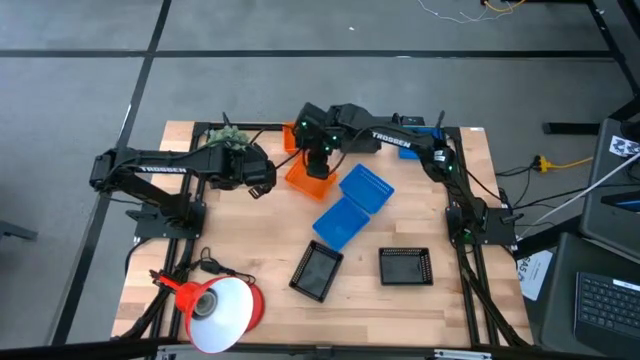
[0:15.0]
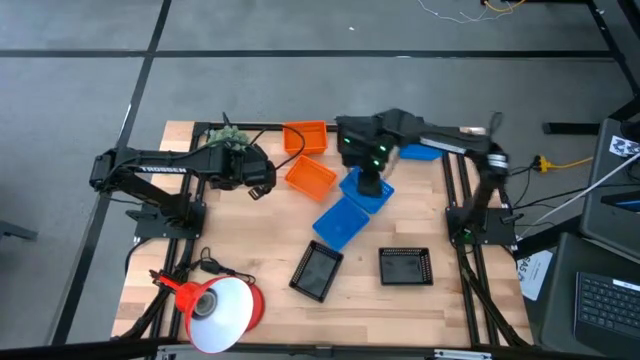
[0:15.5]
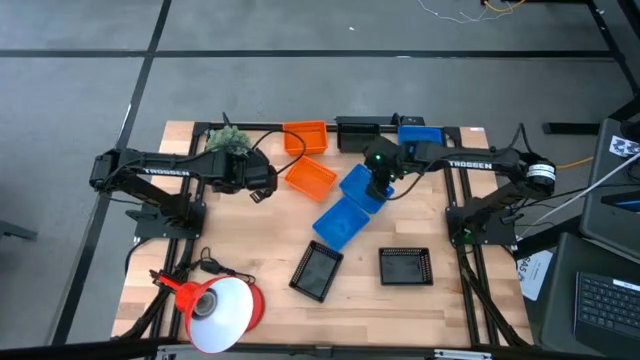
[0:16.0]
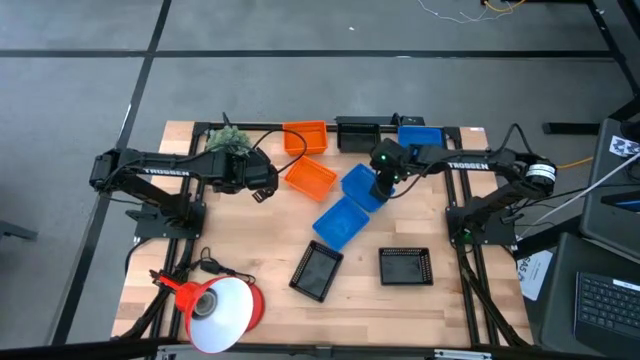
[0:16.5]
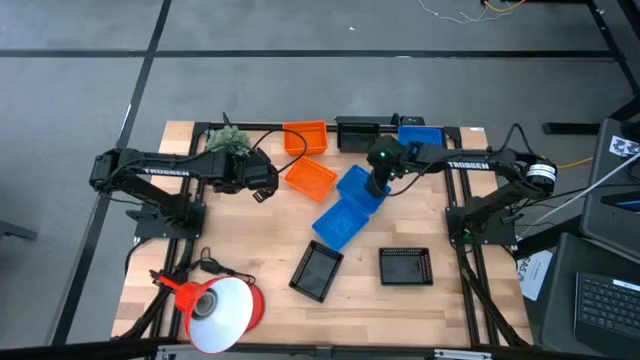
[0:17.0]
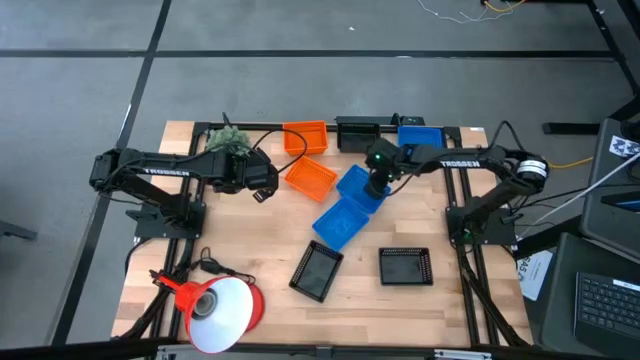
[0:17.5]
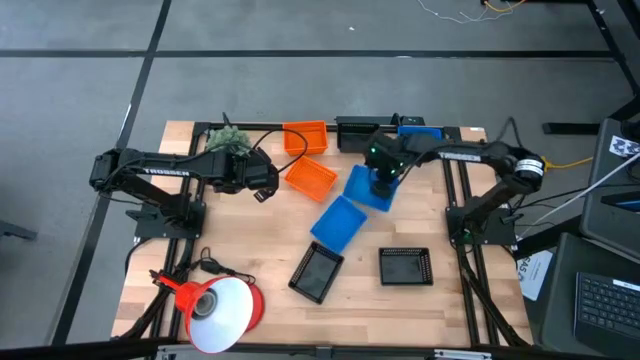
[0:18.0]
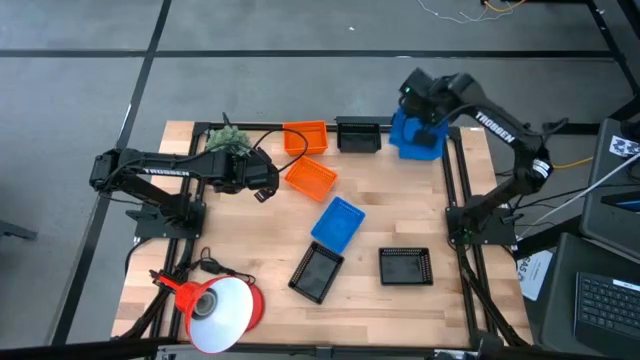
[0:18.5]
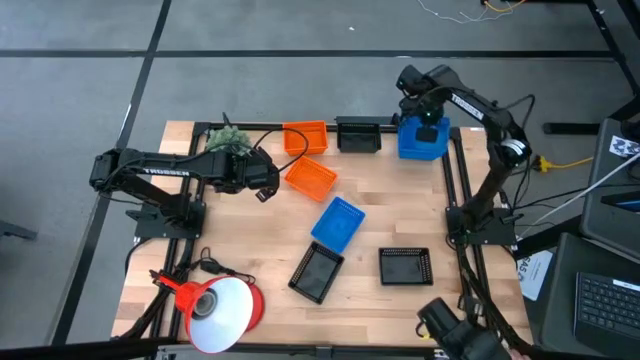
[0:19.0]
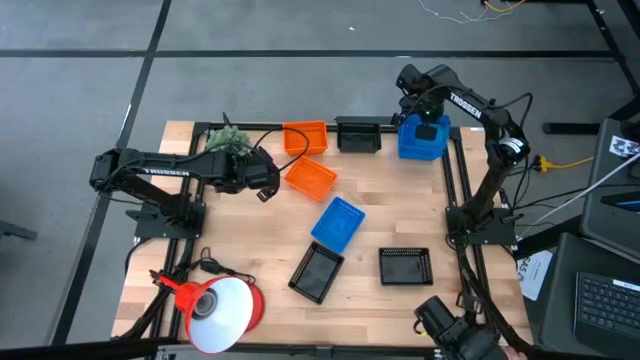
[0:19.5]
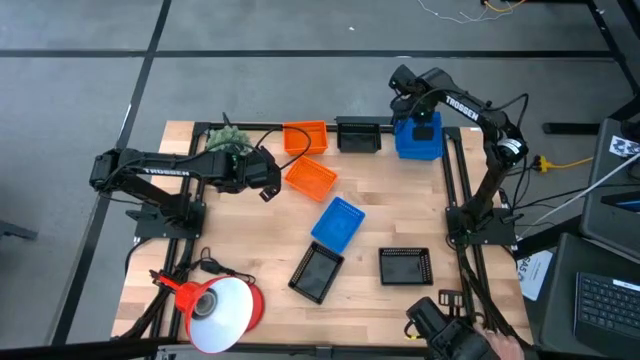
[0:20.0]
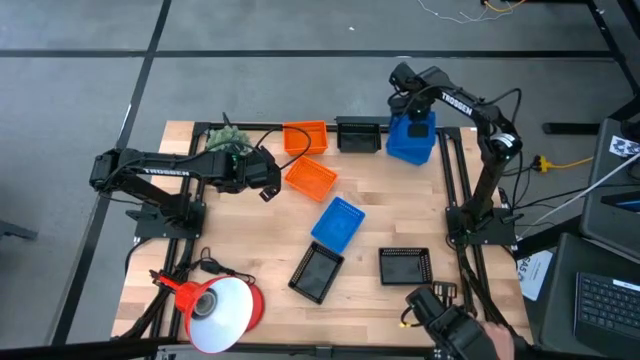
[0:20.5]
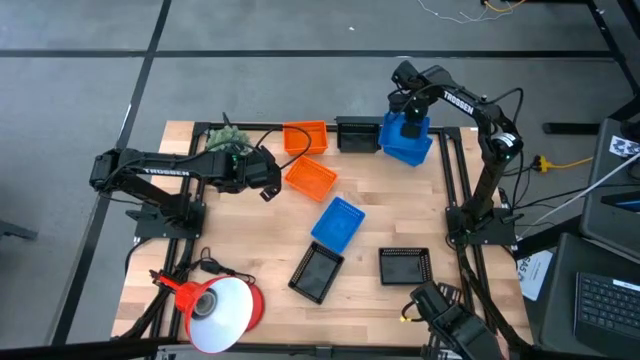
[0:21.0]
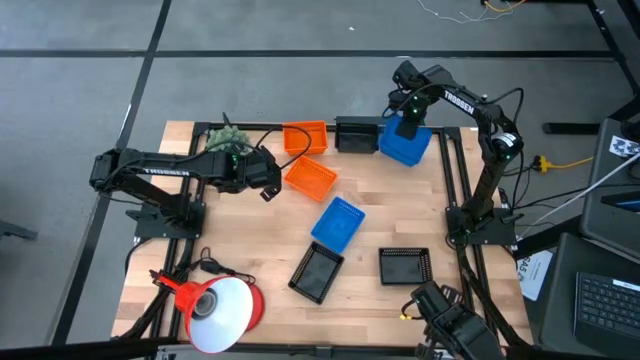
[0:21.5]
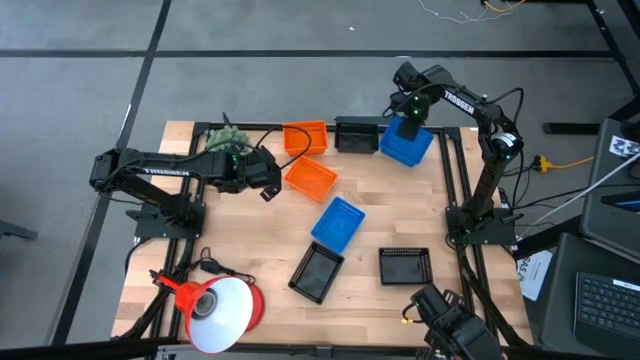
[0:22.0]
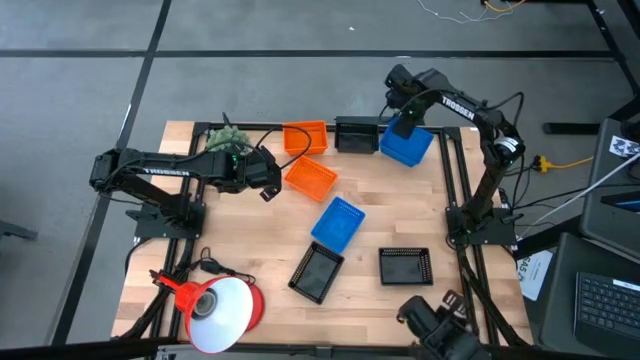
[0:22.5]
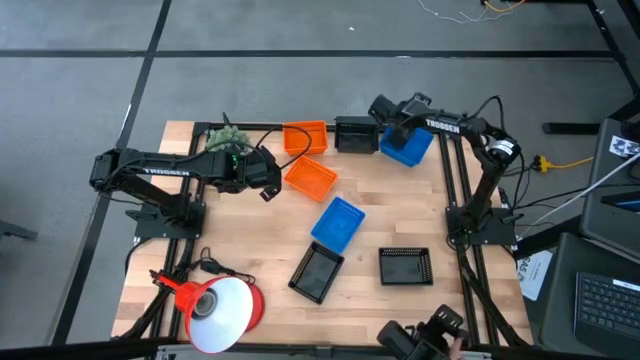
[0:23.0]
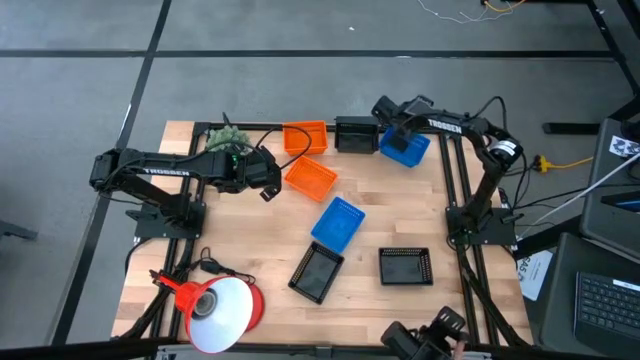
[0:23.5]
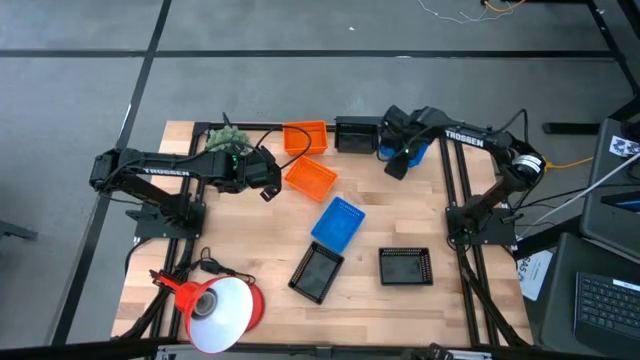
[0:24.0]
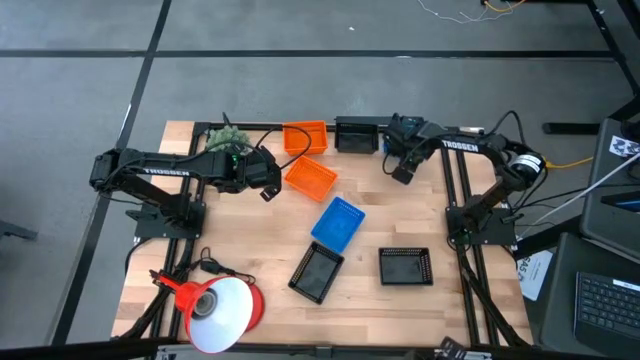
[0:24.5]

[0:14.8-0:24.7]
Stack the top left blue bin on the top right blue bin

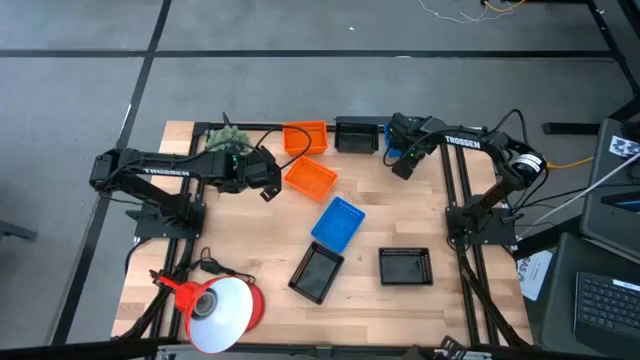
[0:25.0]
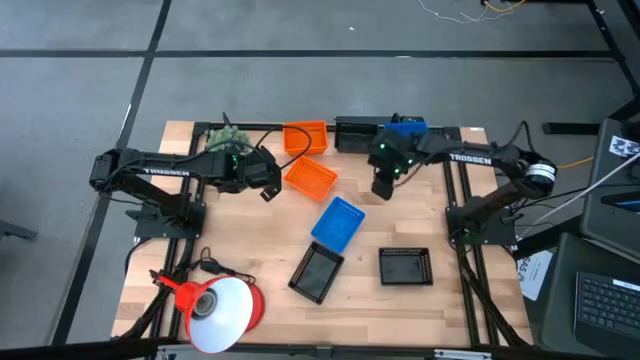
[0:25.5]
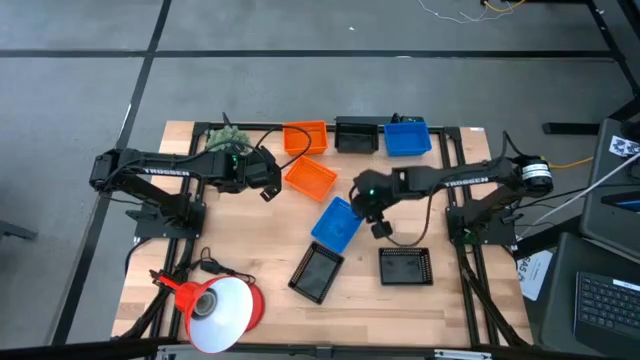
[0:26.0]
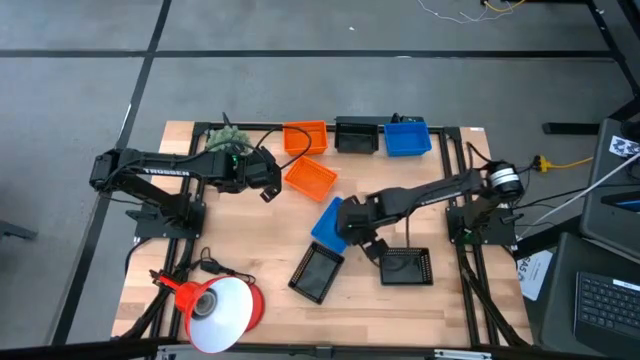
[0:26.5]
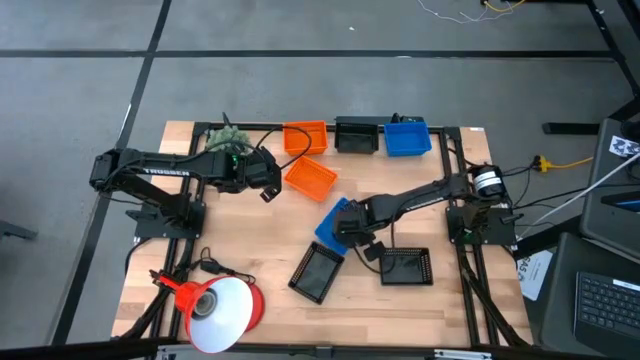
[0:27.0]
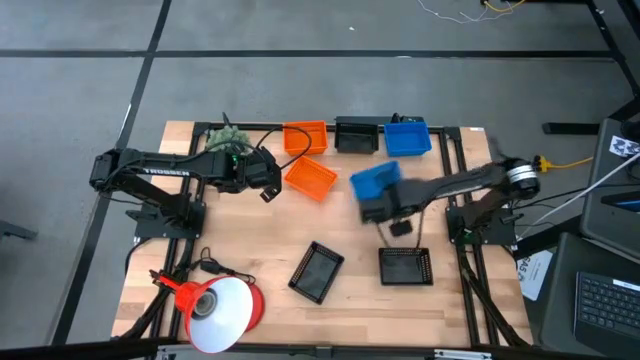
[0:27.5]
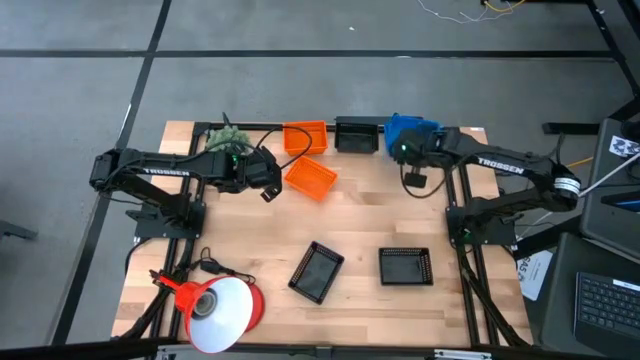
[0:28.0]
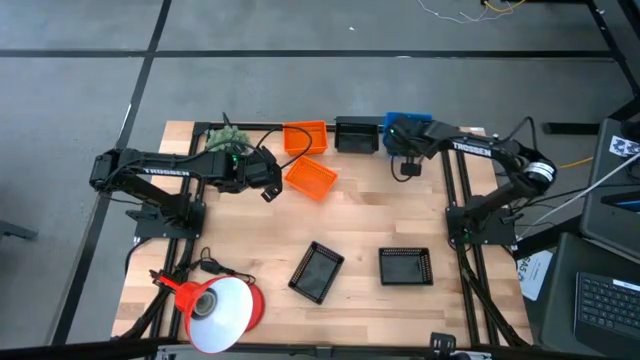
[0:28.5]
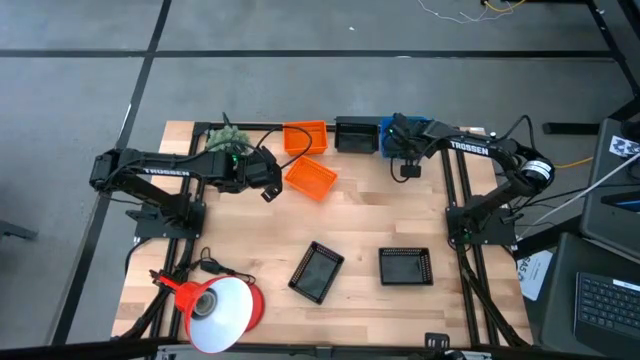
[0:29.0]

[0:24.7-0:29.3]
Stack the bottom blue bin on the top blue bin

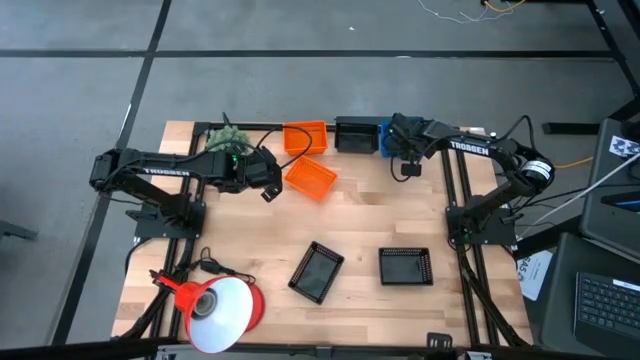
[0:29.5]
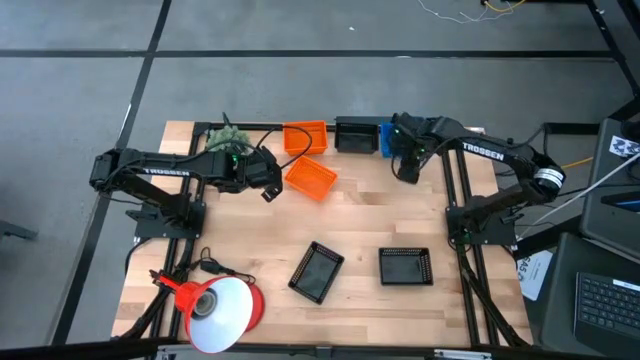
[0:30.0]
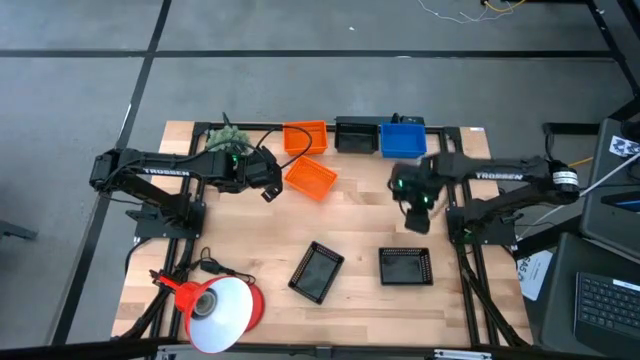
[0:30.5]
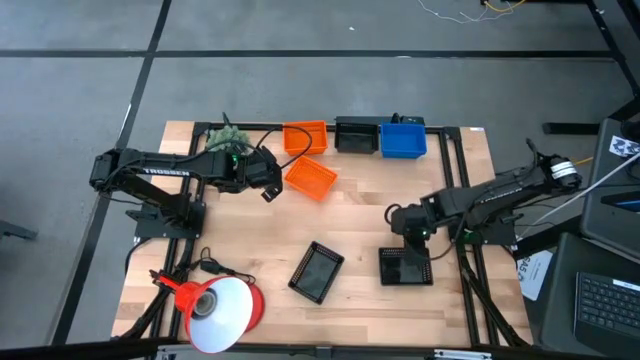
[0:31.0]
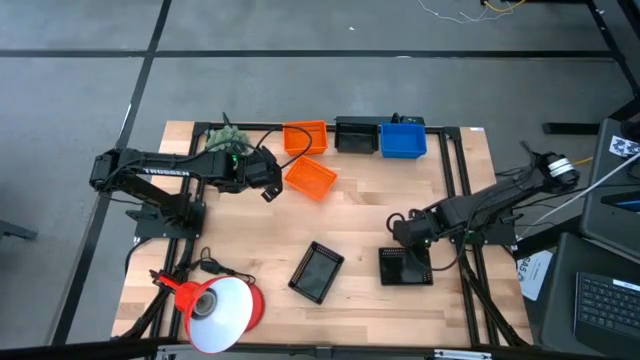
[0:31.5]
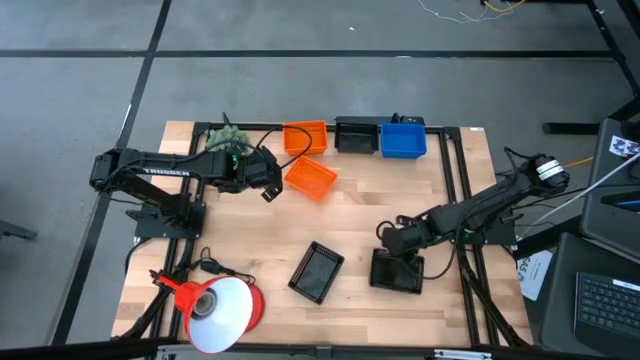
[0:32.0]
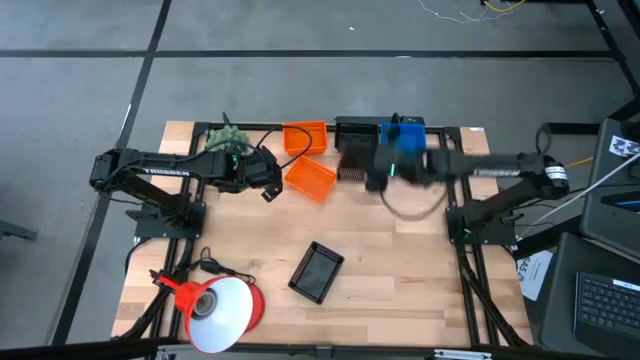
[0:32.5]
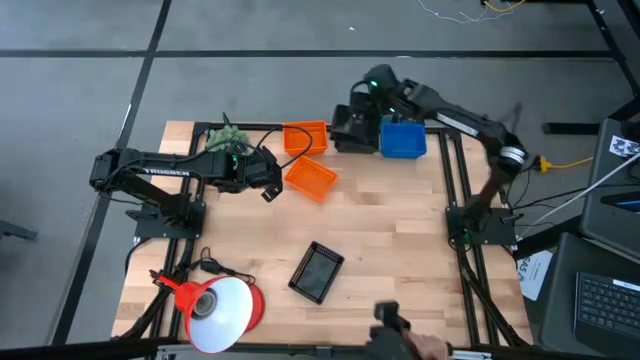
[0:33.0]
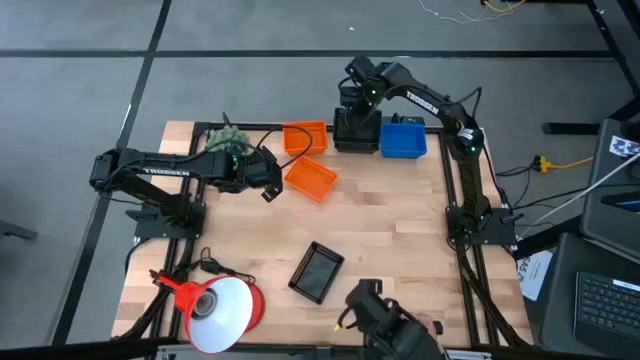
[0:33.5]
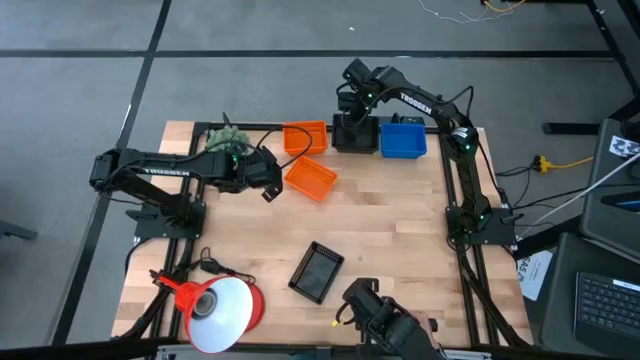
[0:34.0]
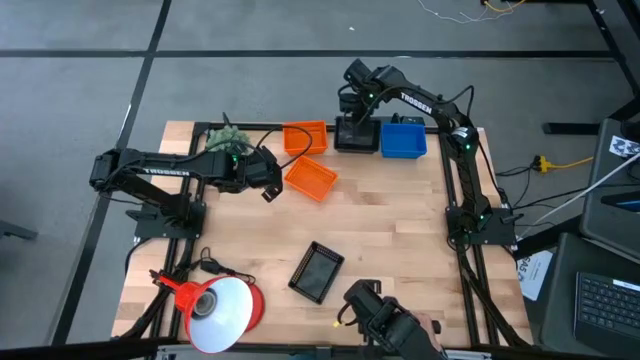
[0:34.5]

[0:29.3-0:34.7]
Stack the right black bin on the top black bin

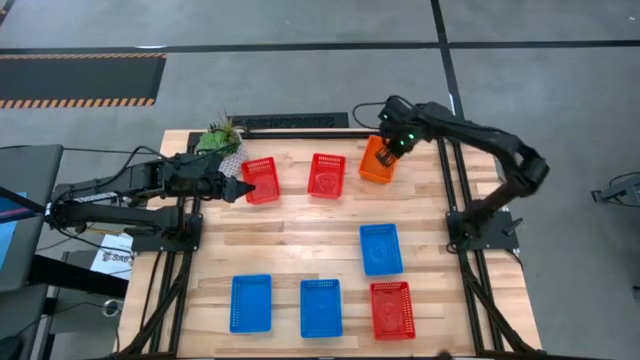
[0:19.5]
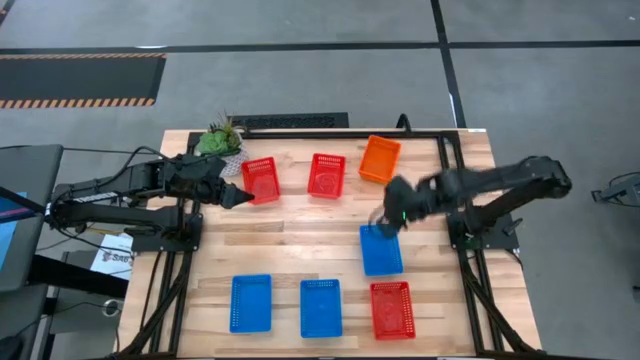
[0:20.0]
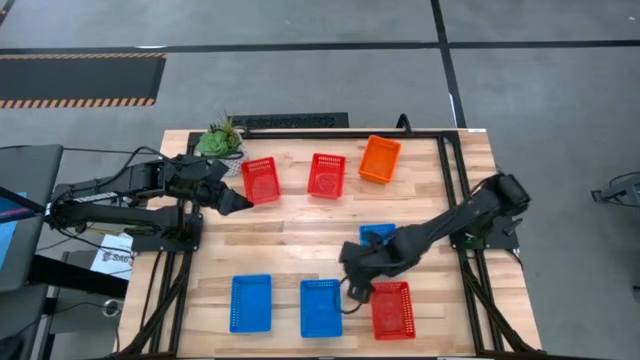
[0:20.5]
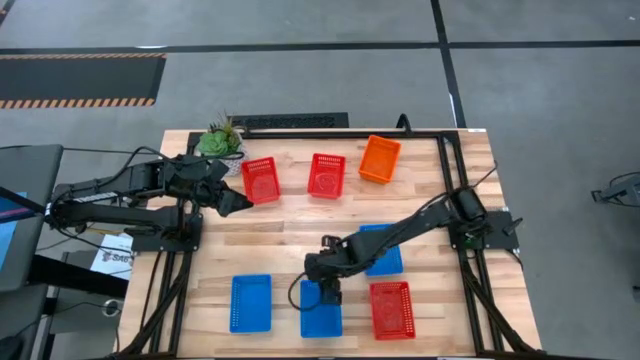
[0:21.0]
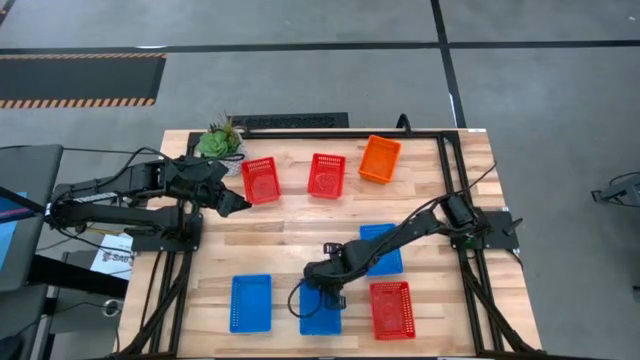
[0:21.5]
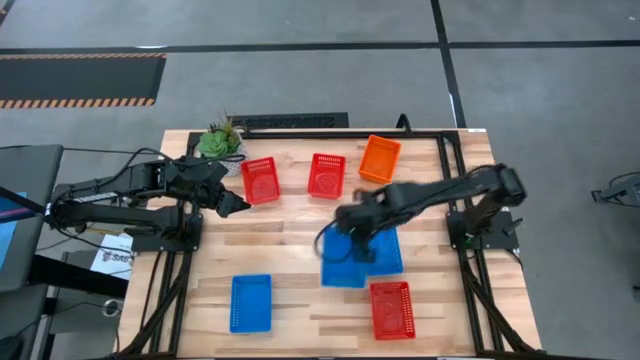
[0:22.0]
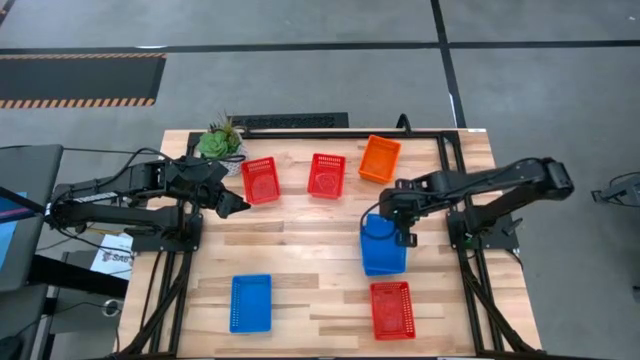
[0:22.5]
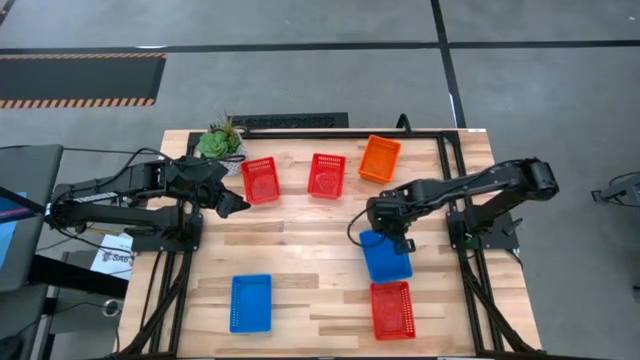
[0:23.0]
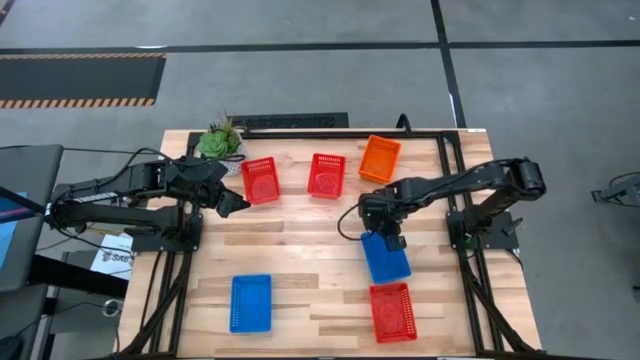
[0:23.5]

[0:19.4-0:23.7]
Stack the bottom right blue bin on top of the top blue bin
